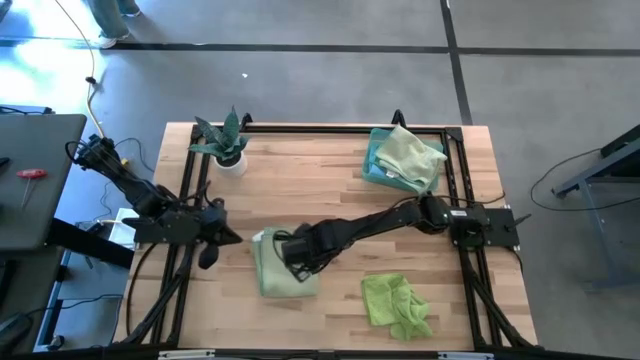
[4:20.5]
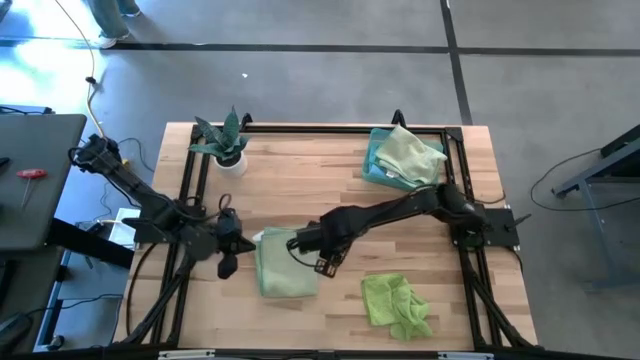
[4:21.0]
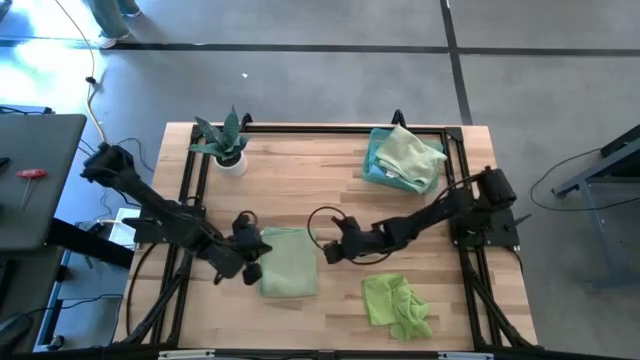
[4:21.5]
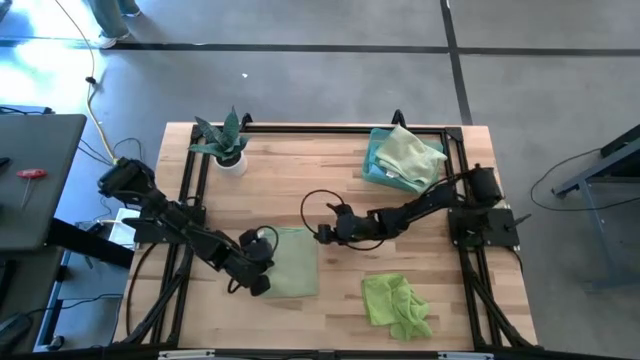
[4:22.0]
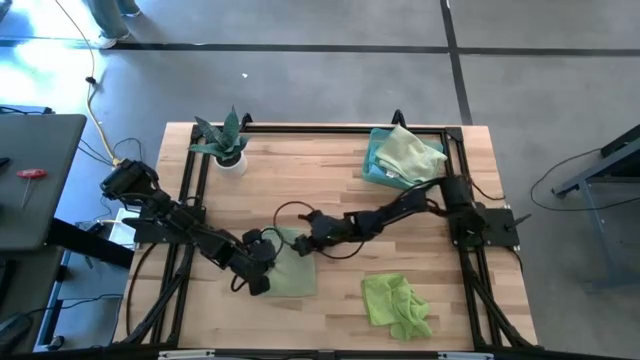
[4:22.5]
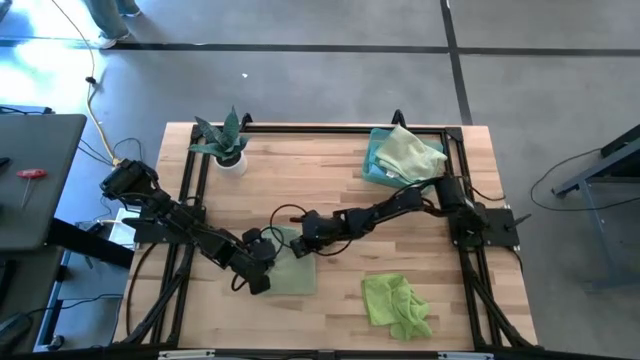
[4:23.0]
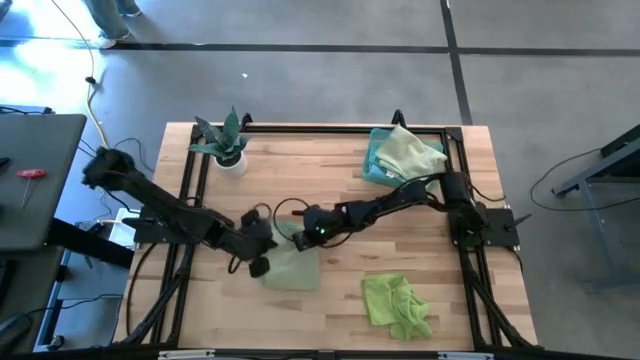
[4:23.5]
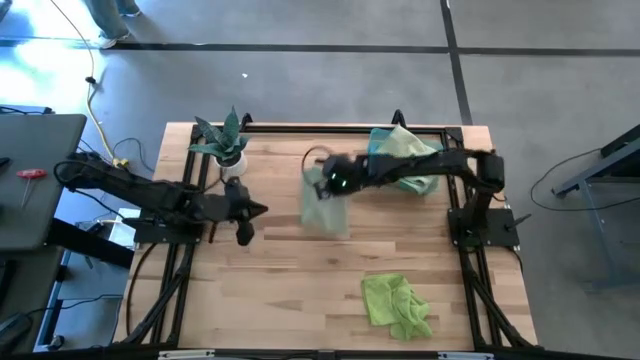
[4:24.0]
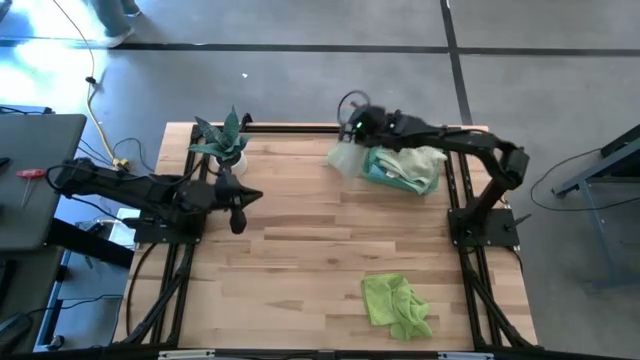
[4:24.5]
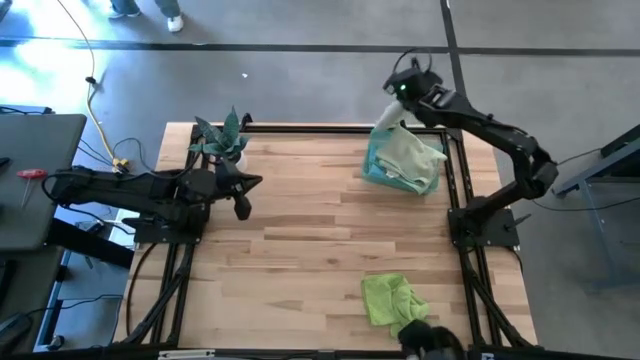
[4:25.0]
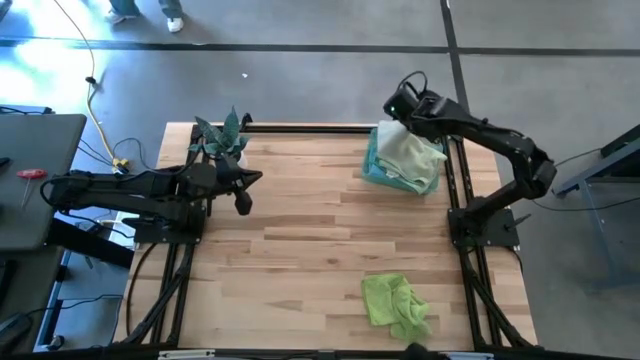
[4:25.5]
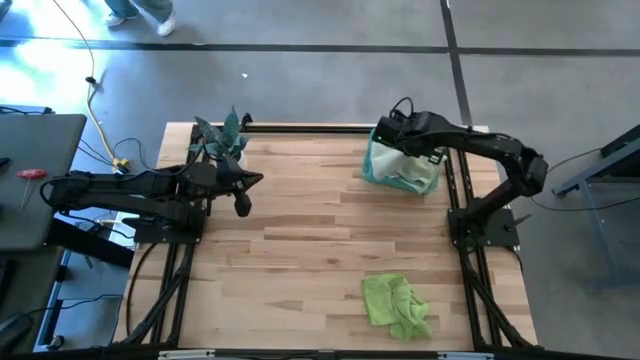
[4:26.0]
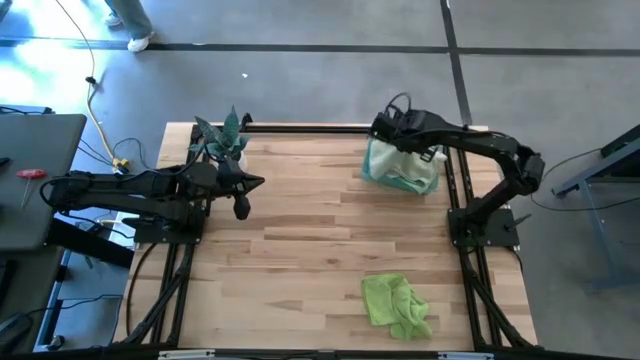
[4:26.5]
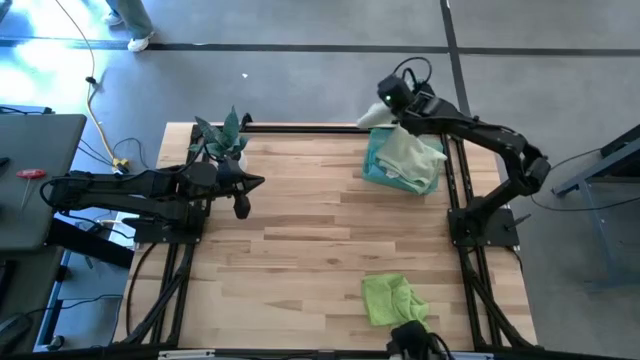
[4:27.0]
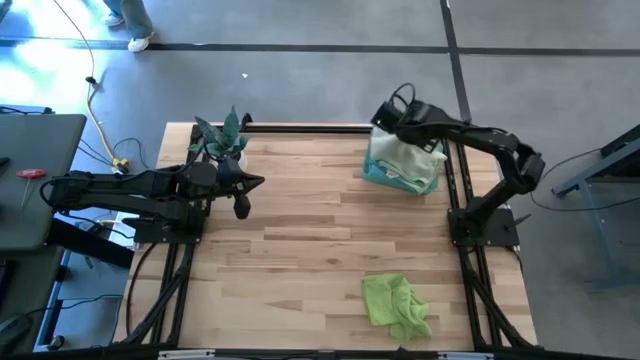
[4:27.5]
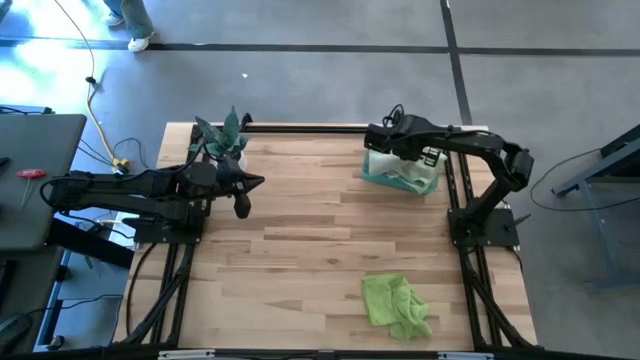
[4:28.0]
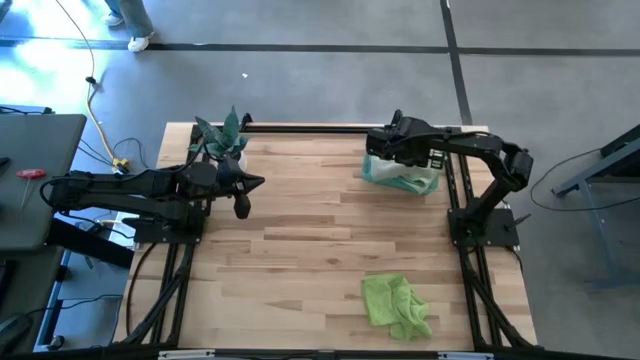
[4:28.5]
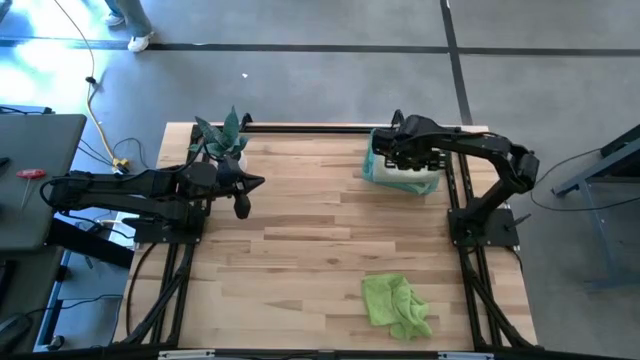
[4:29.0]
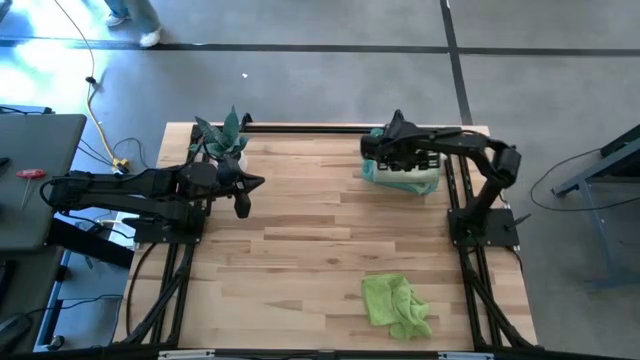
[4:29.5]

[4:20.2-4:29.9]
Task: Fold microfiber towels
Stack the folded green microfiber cloth on top of the folded green microfiber cloth

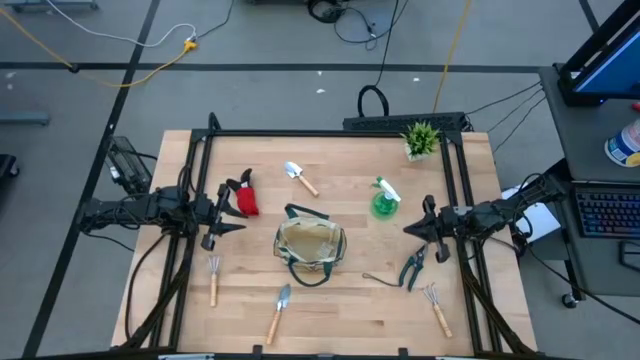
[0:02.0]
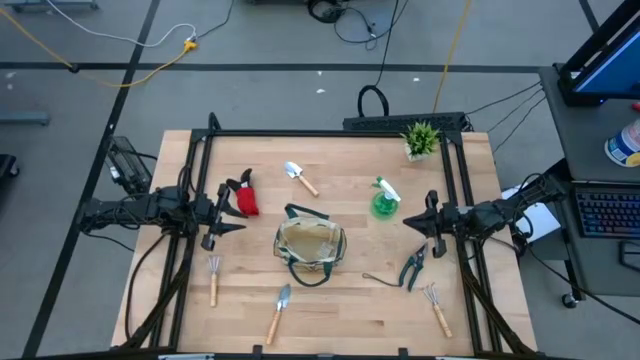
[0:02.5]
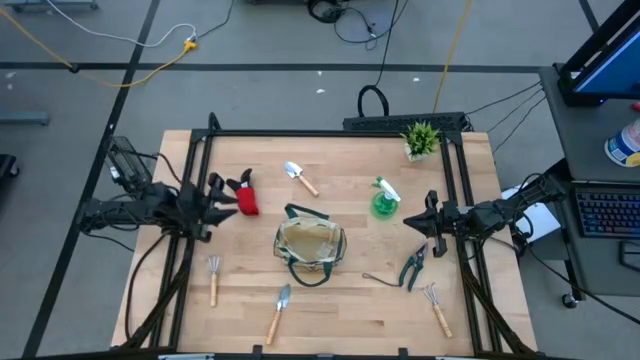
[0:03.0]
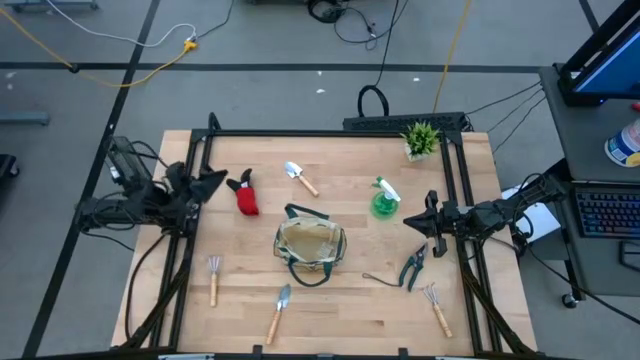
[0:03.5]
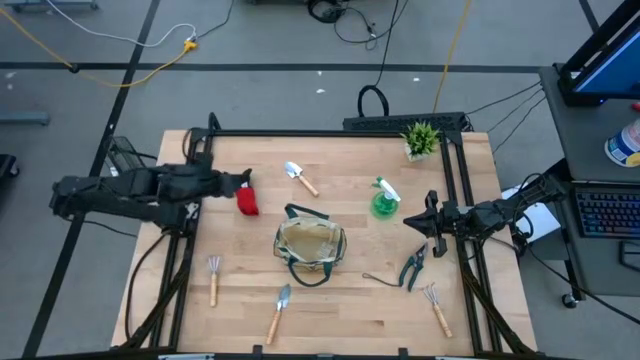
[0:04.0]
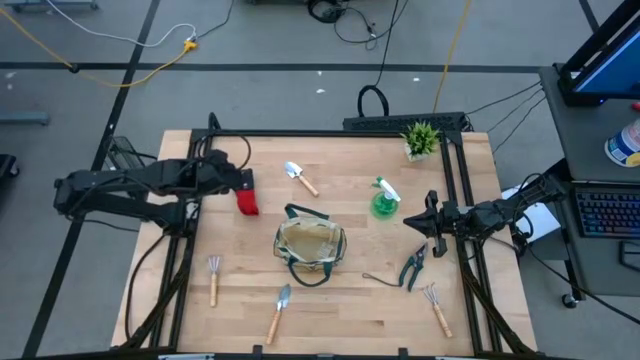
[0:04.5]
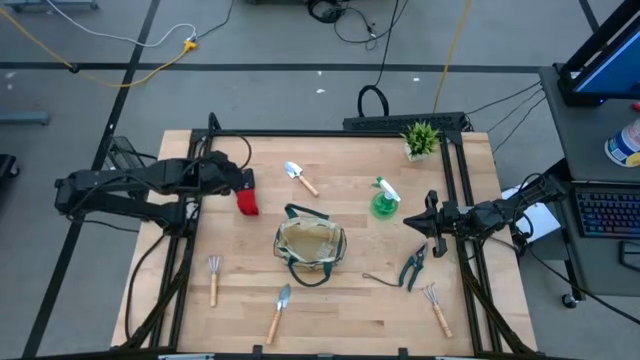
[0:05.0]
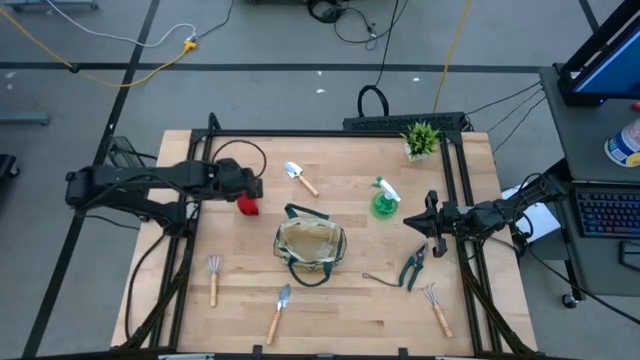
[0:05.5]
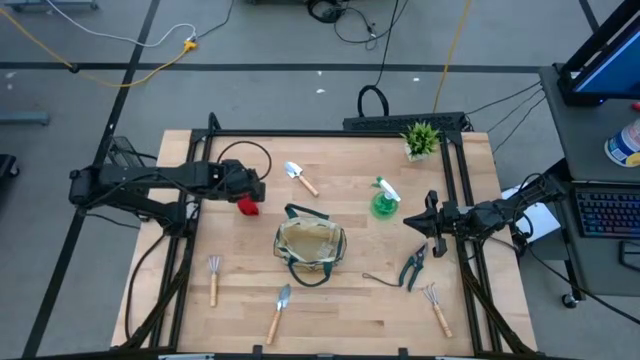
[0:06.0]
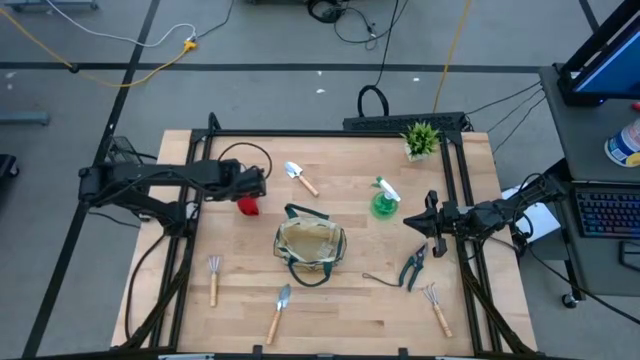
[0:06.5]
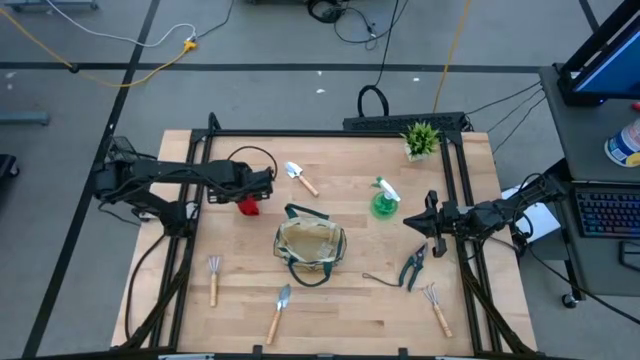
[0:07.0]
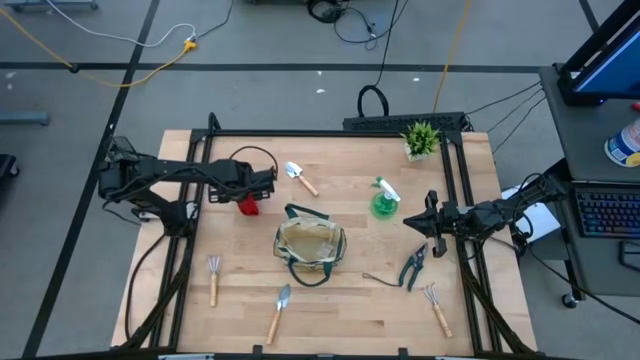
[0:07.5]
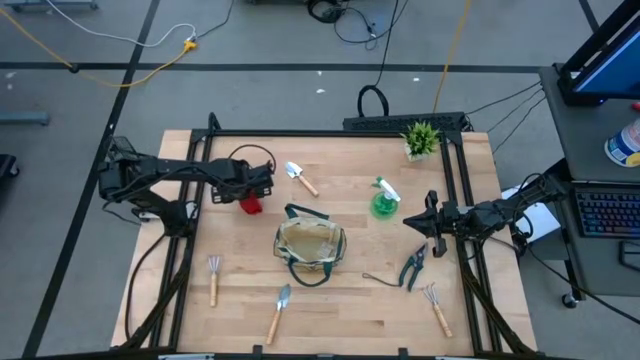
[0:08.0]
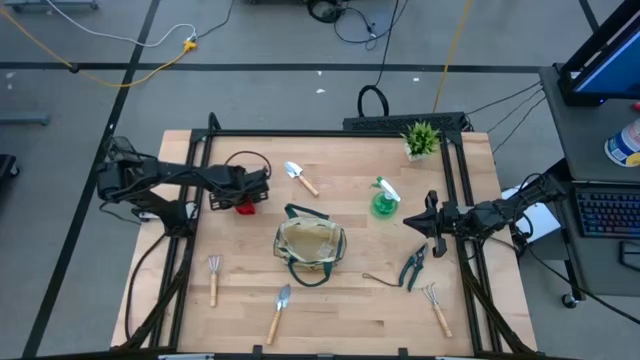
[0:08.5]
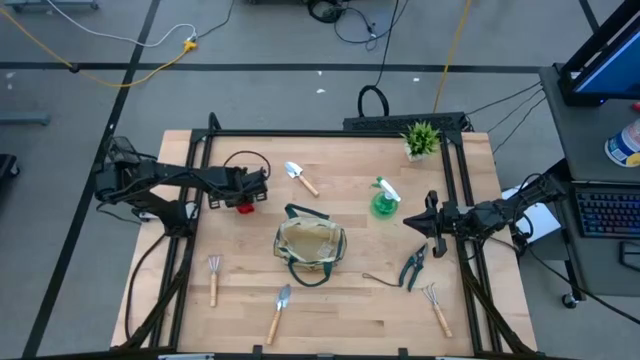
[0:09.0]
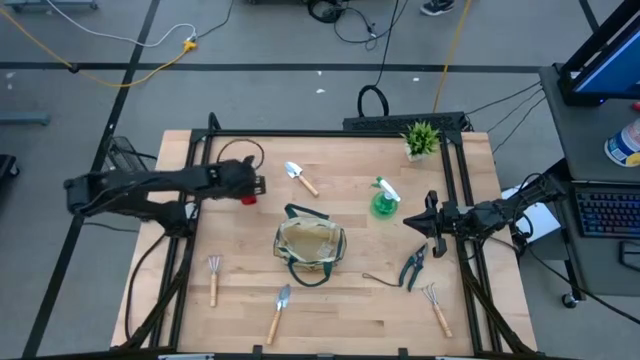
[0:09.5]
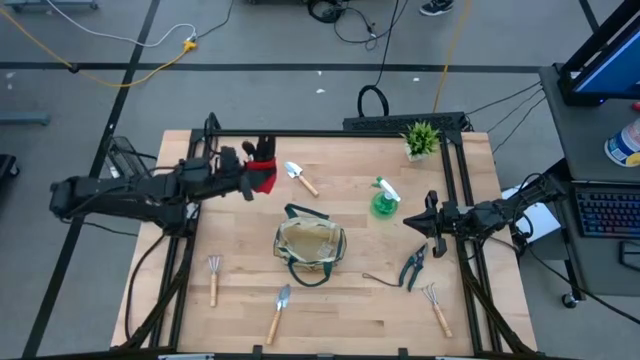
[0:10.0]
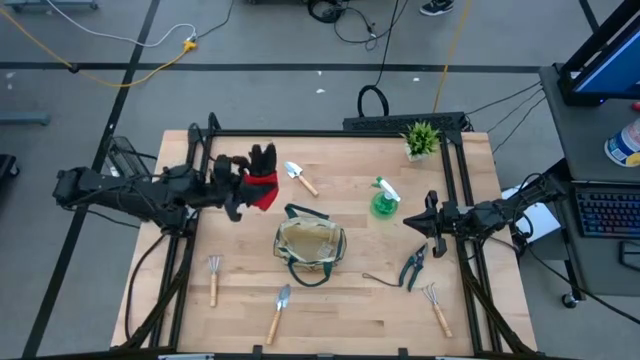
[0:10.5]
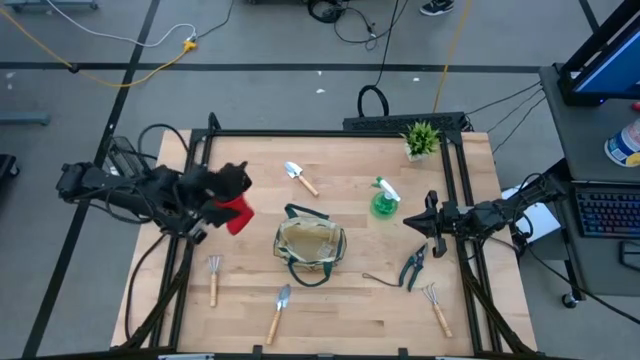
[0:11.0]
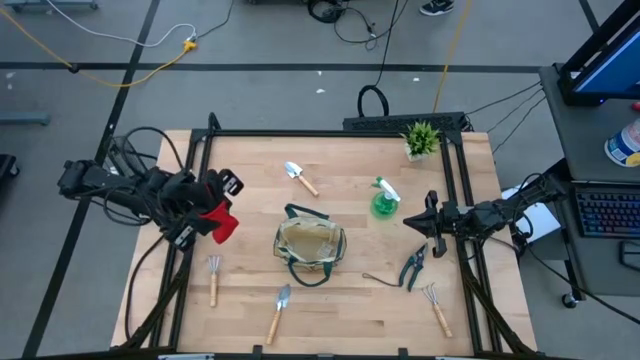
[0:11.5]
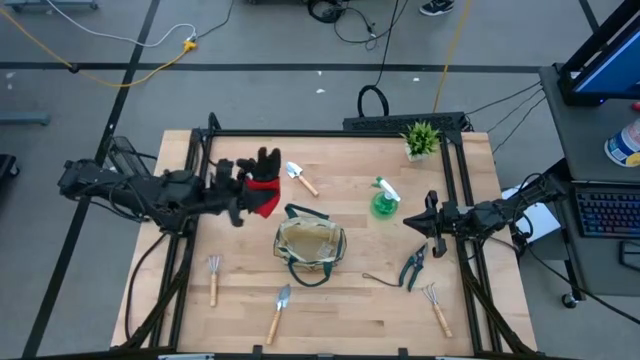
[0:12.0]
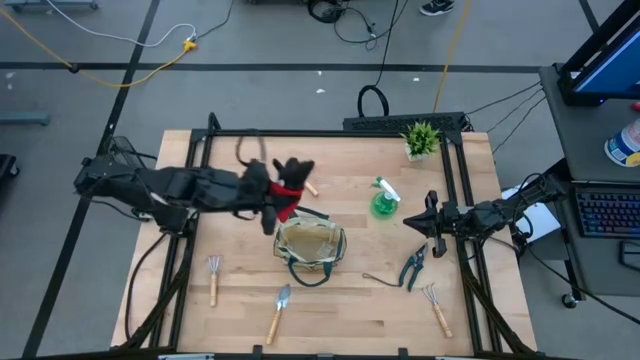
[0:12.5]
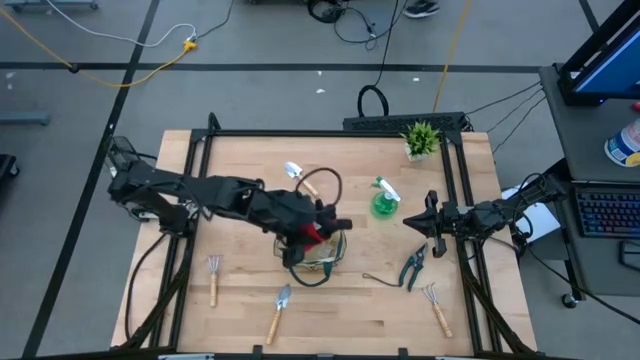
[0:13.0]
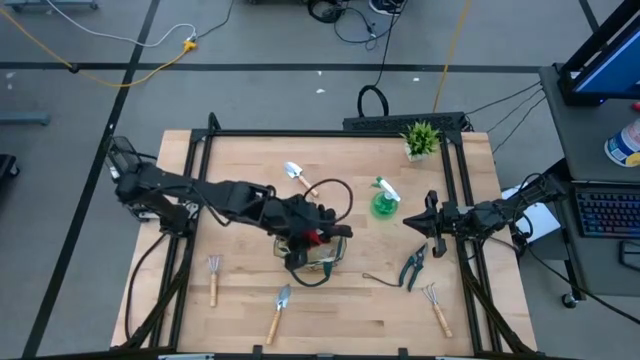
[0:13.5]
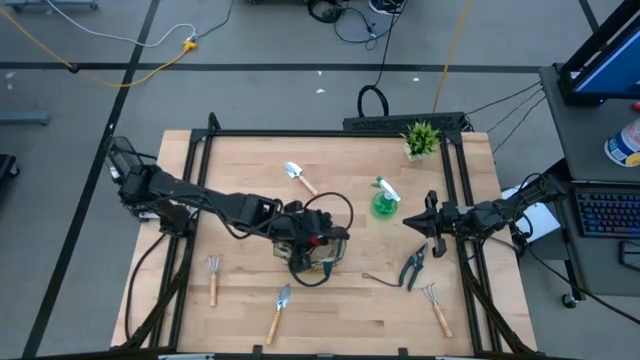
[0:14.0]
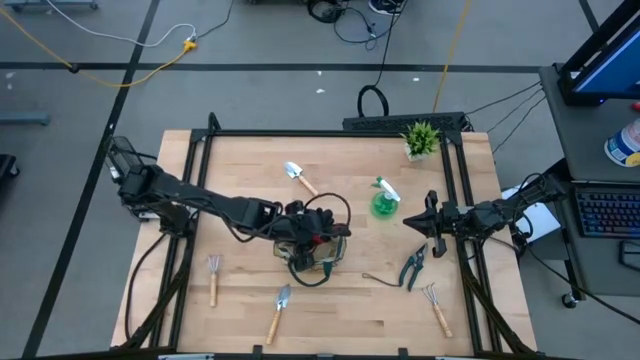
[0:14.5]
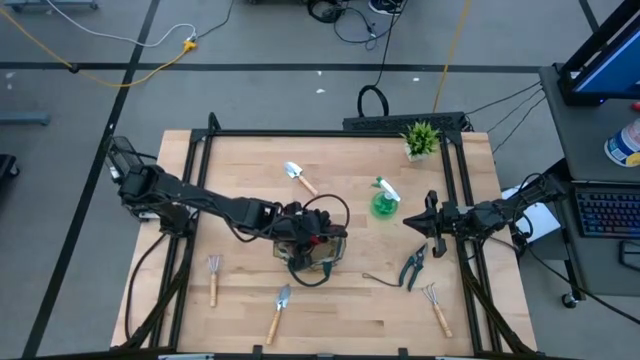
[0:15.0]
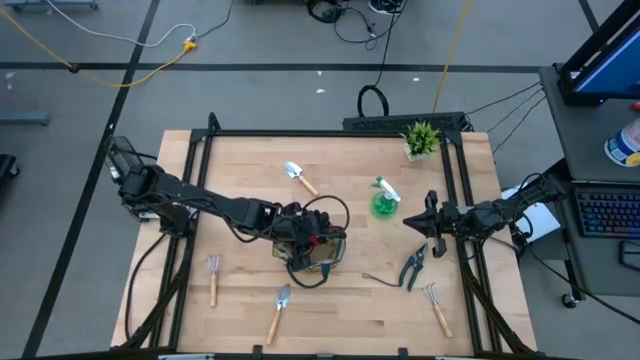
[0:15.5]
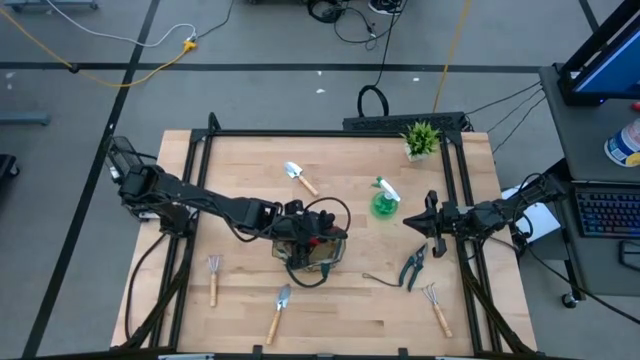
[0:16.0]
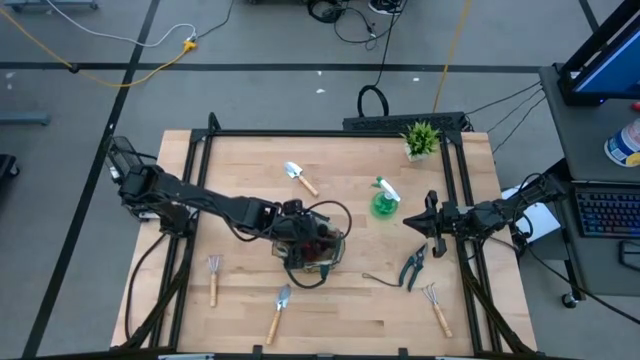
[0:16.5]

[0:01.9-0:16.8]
Task: Pick & Place Garden tools in Gardening bag
Put the gloves into the gardening bag
